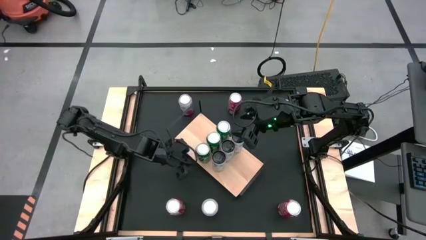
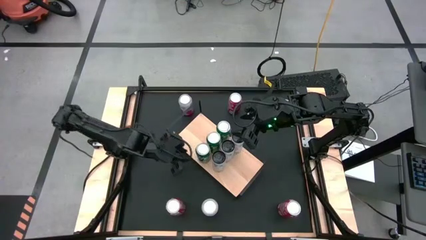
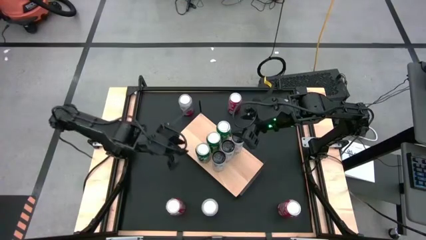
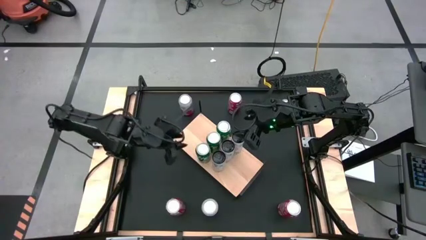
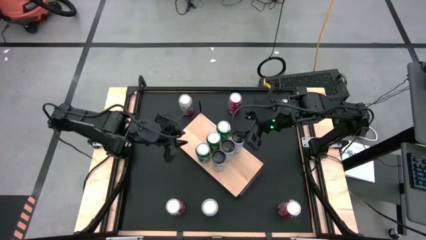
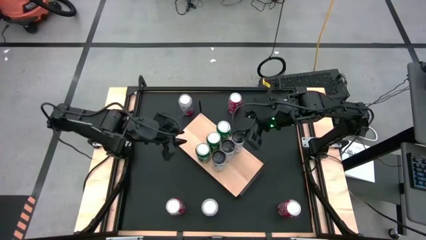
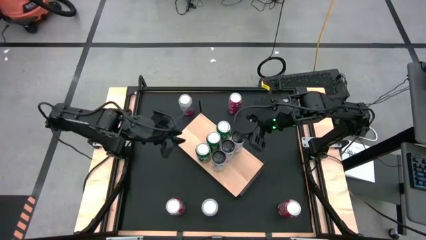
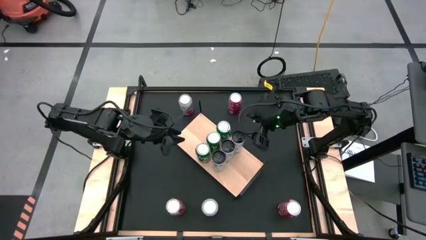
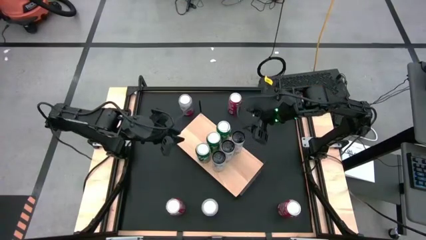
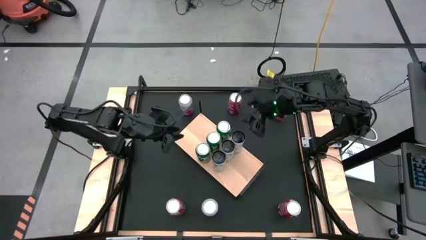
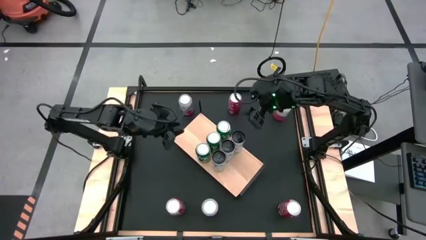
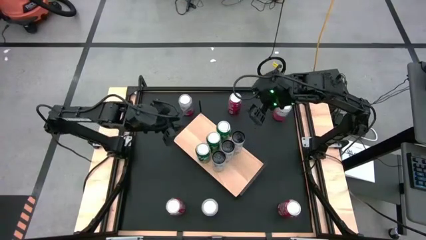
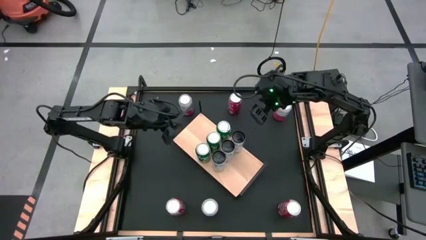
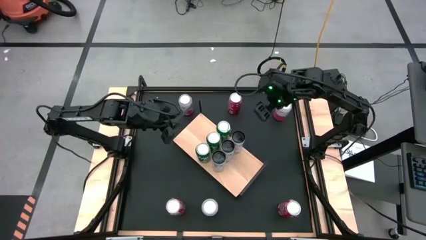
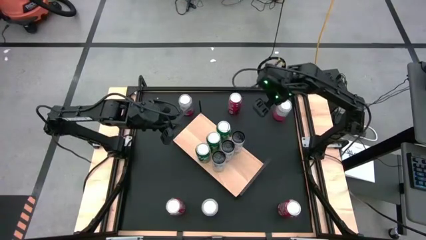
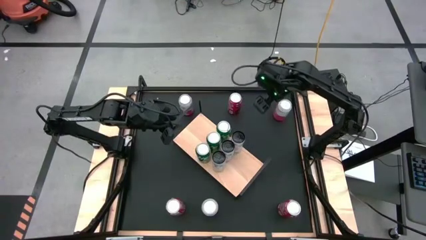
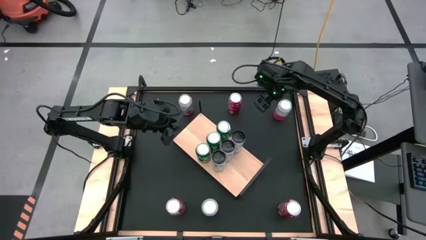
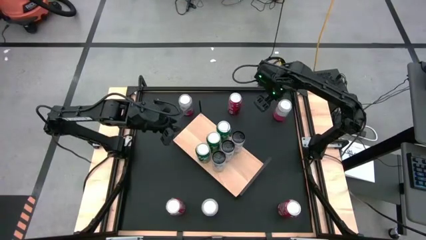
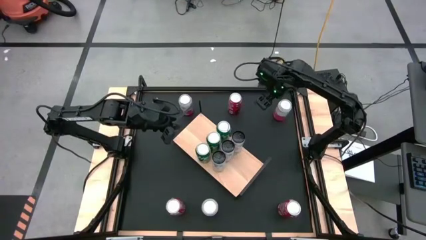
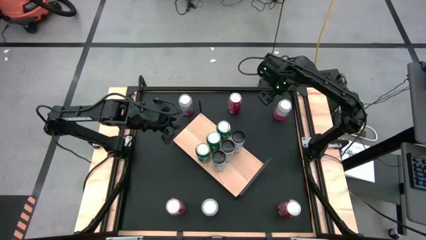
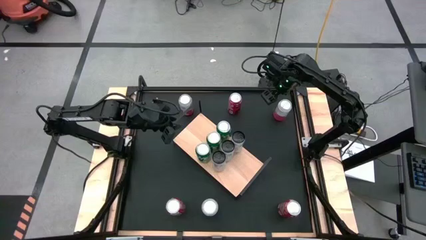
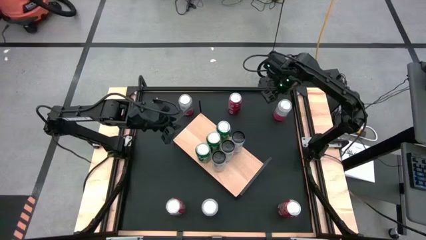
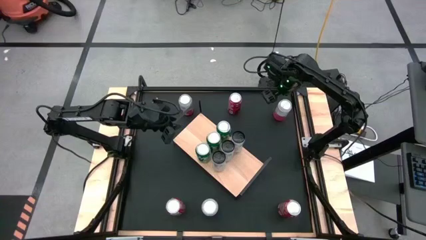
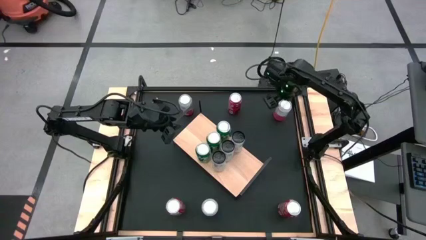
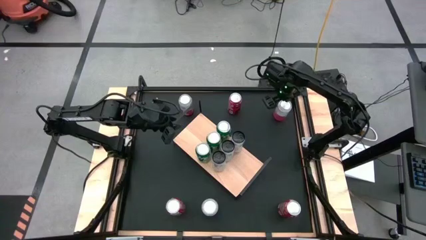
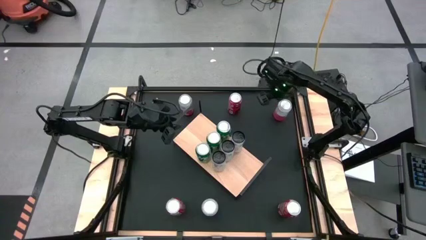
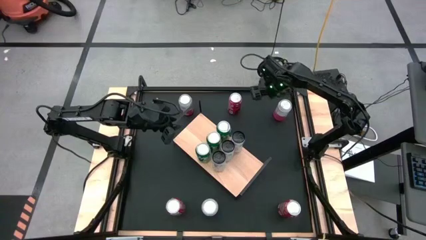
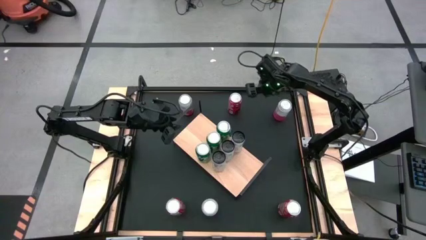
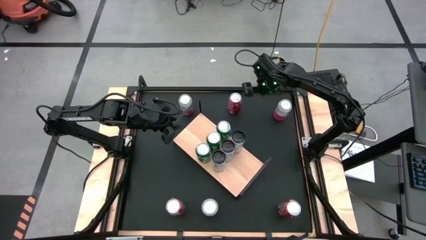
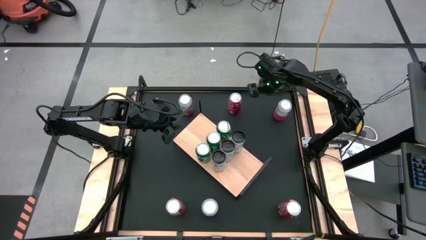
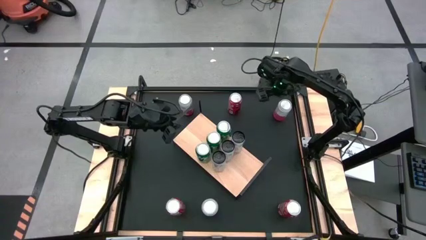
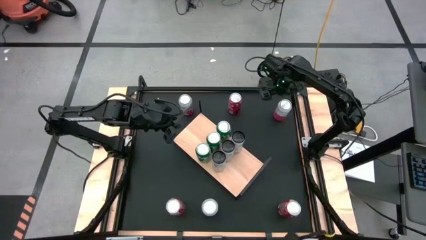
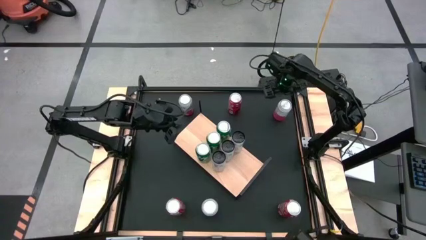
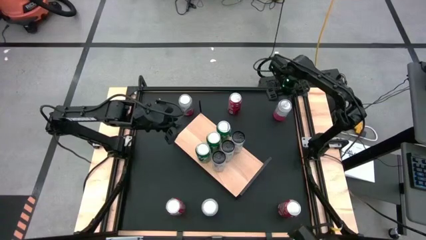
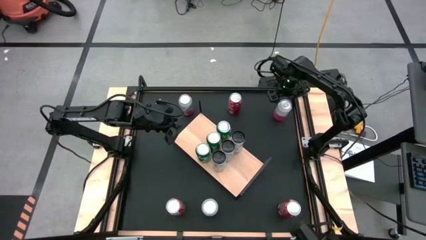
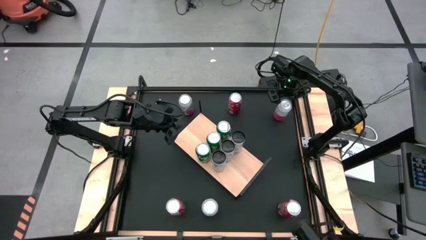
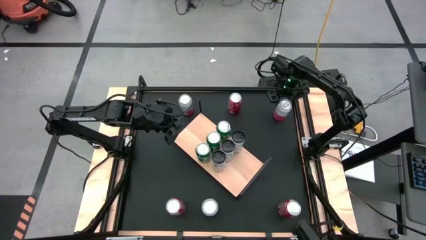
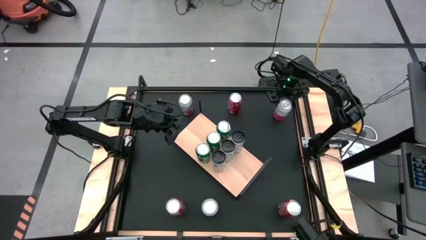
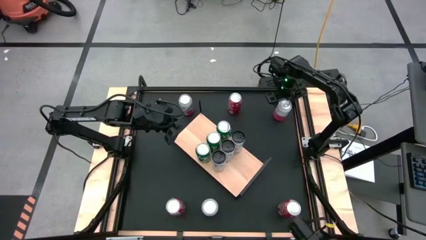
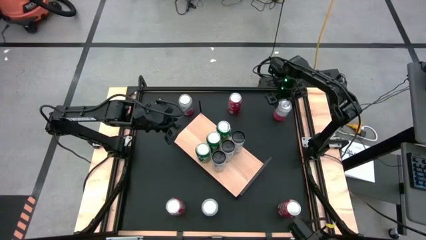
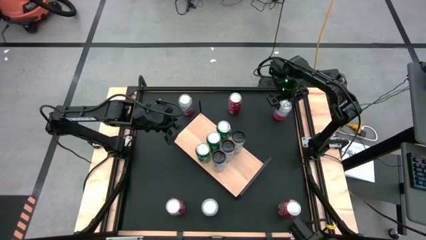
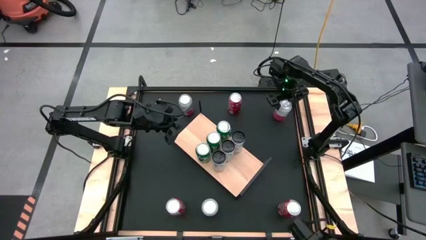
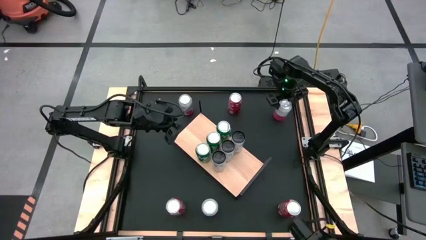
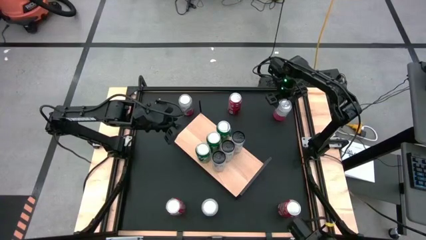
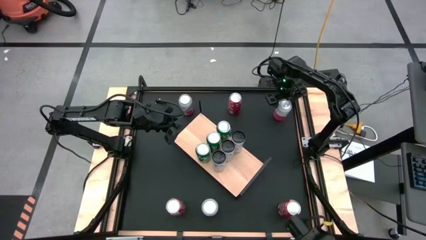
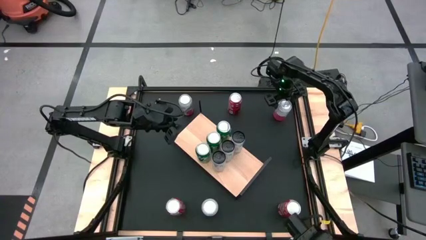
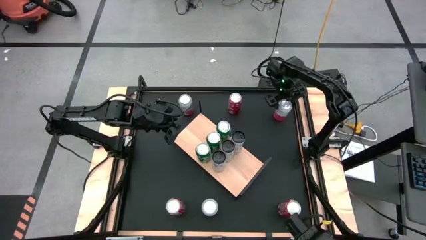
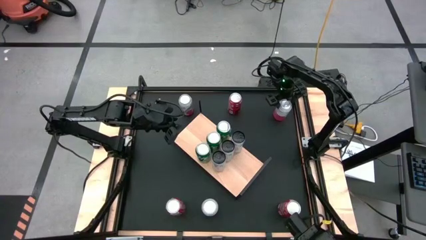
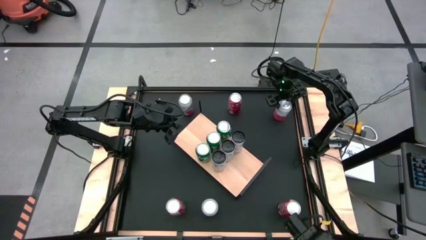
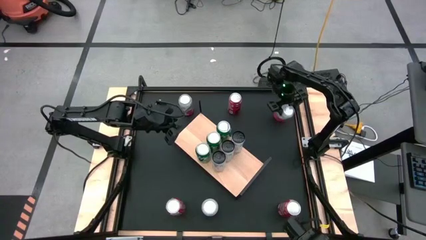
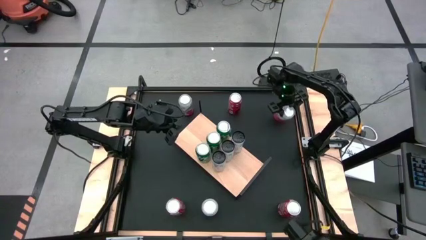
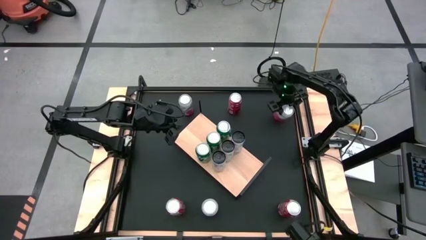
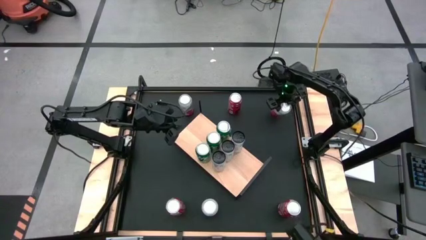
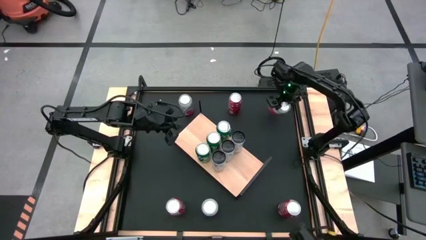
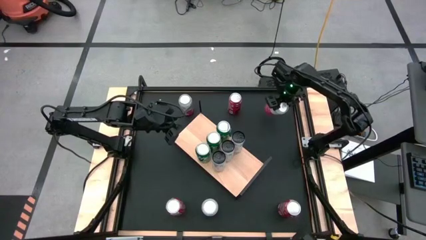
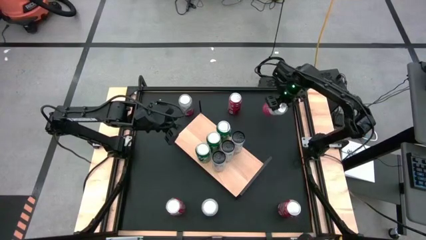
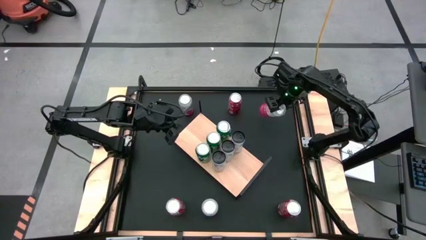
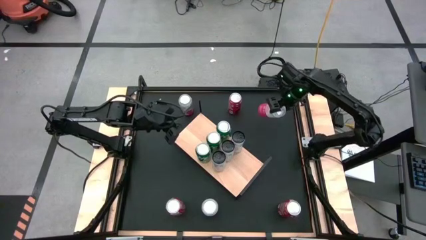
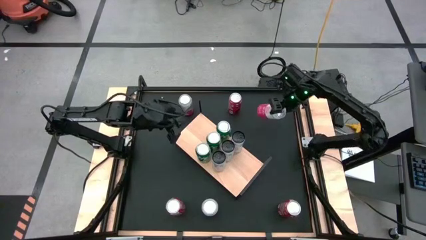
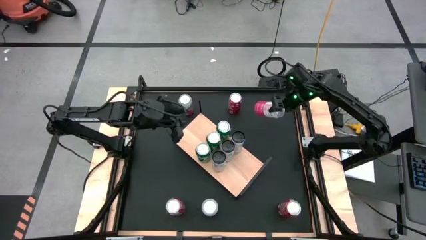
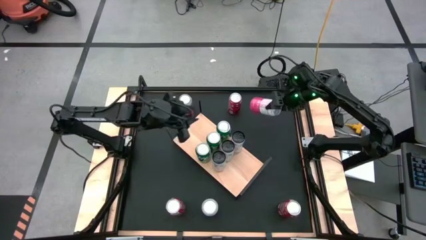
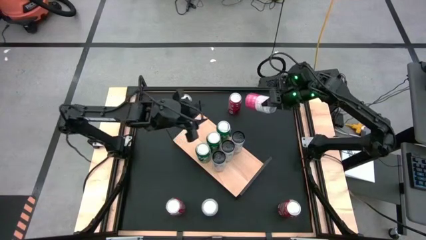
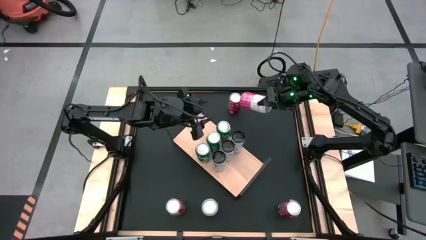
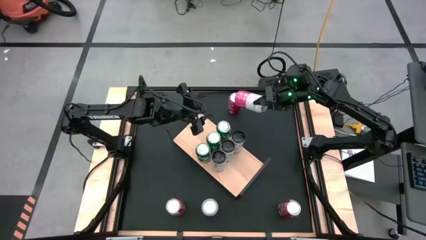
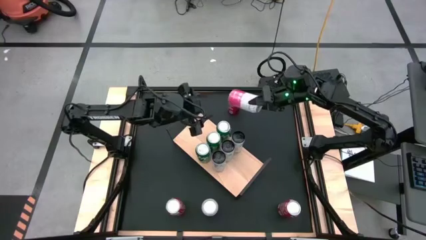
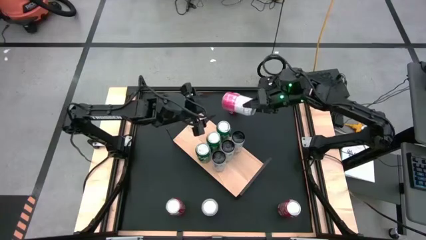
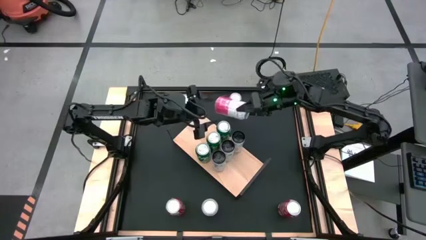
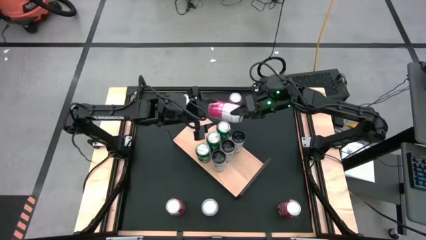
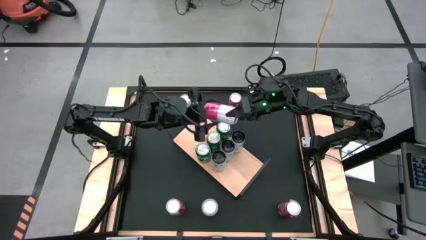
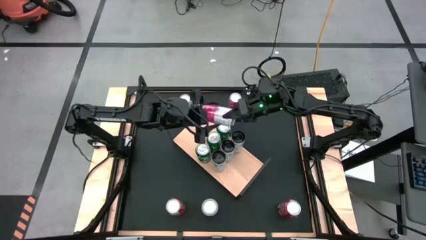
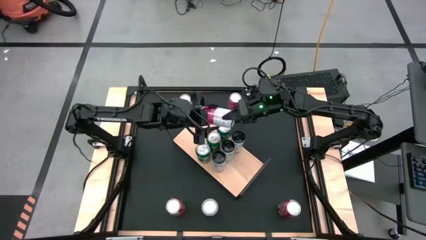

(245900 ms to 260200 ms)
Task: Place canned beverage on shelf
Put the top right white and pink soda can on the shelf

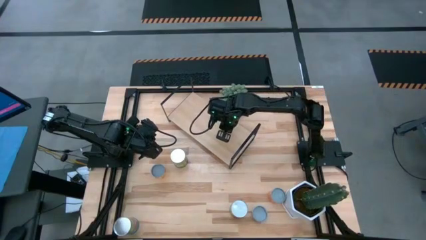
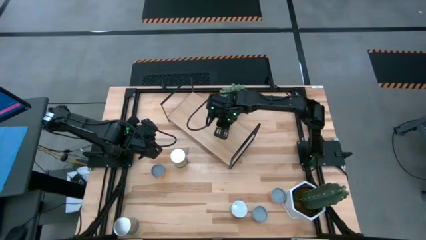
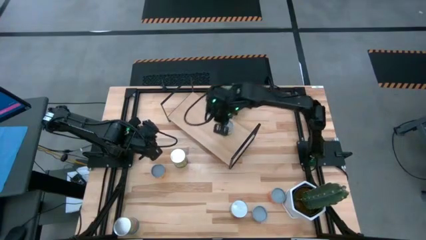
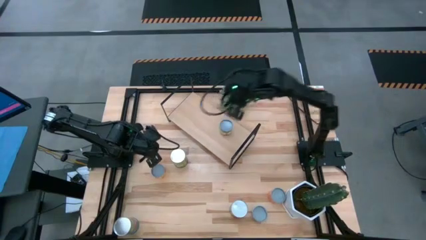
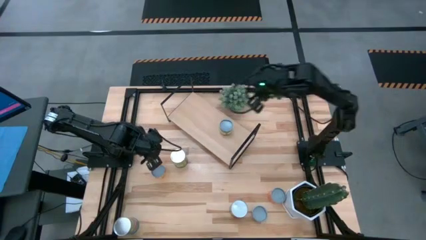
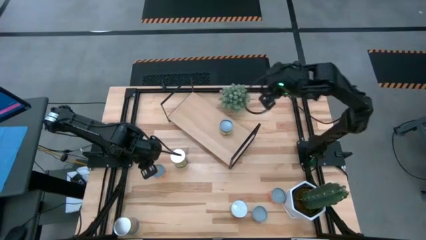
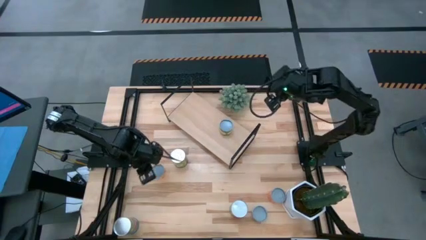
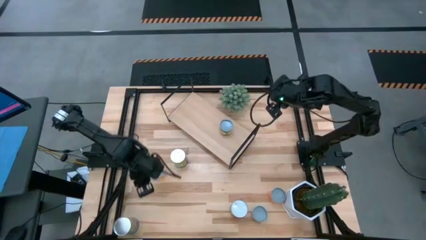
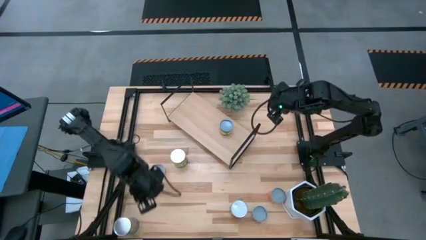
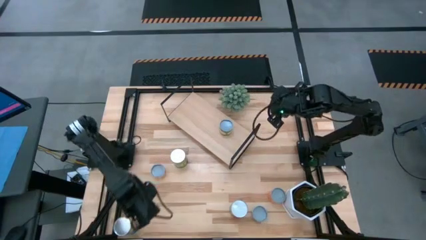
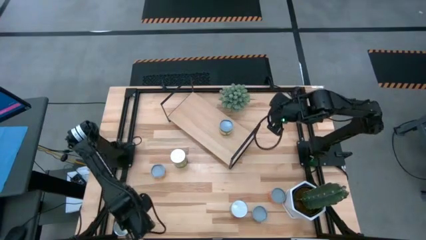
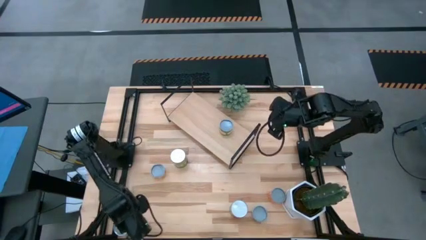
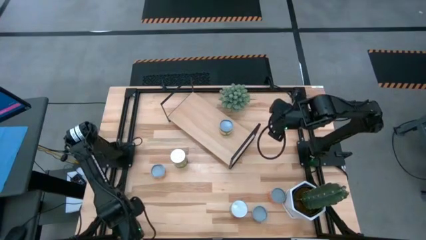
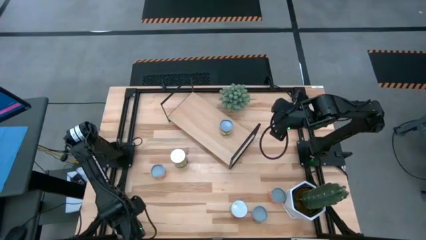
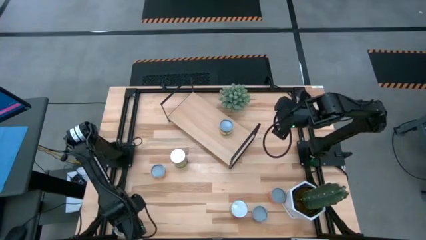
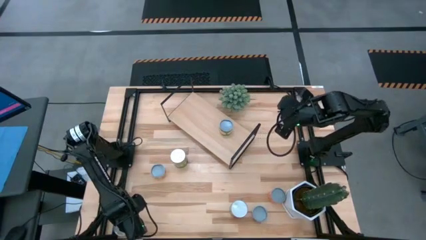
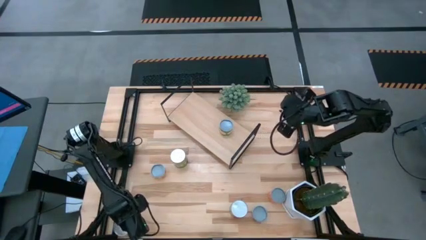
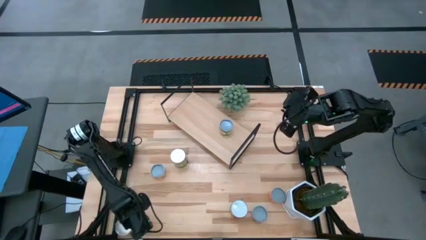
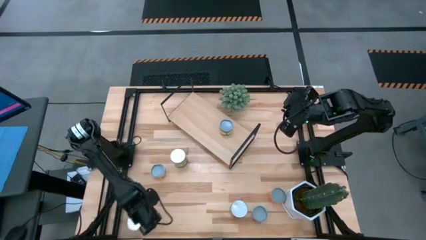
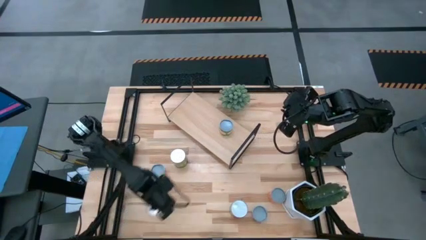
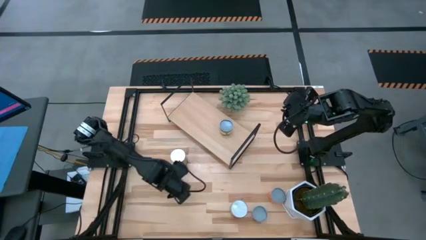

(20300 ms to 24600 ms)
Task: Pick and place cans onto a shelf
Move the canned tomatoes from the bottom to the center of the table
